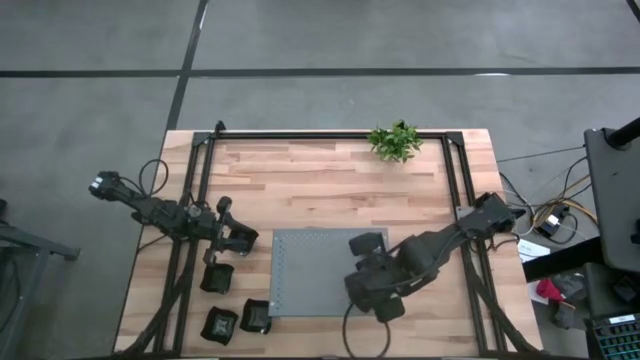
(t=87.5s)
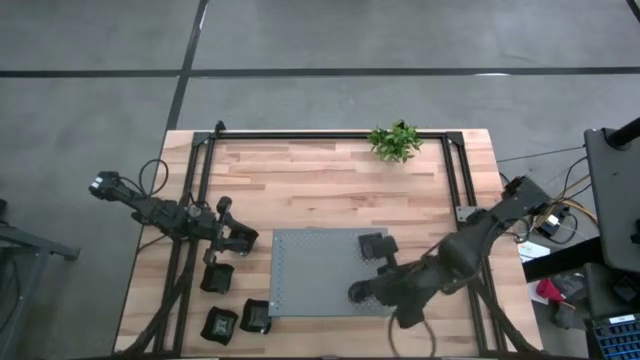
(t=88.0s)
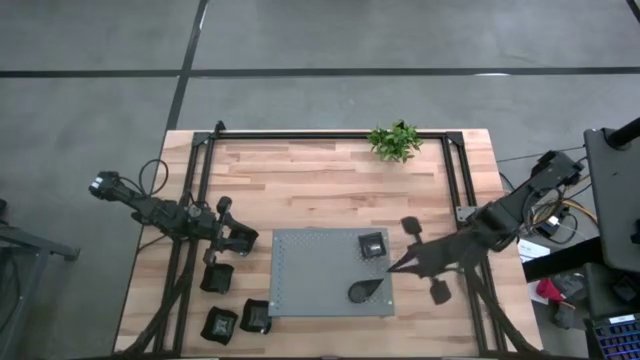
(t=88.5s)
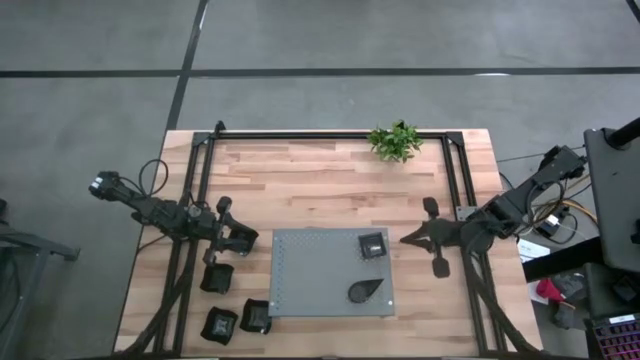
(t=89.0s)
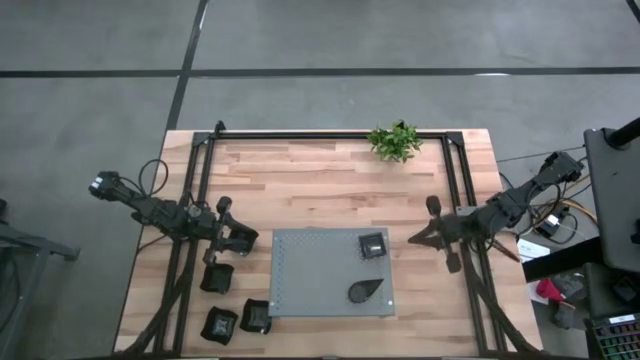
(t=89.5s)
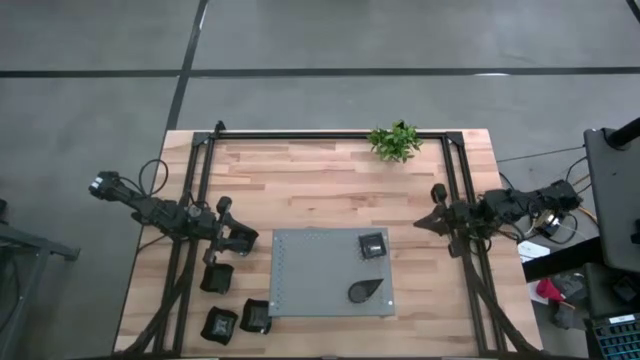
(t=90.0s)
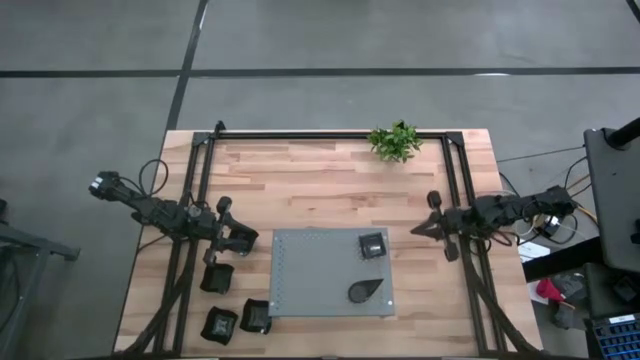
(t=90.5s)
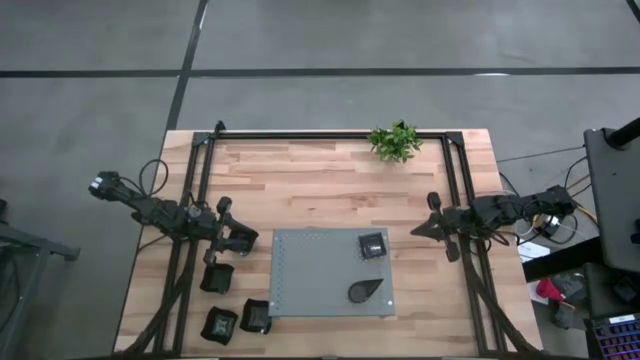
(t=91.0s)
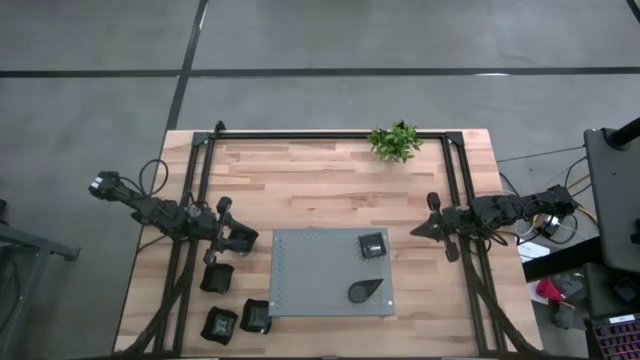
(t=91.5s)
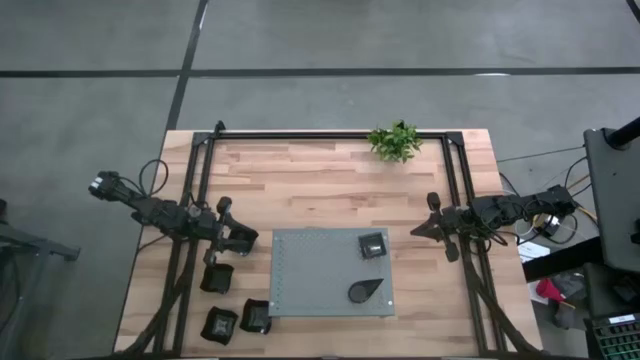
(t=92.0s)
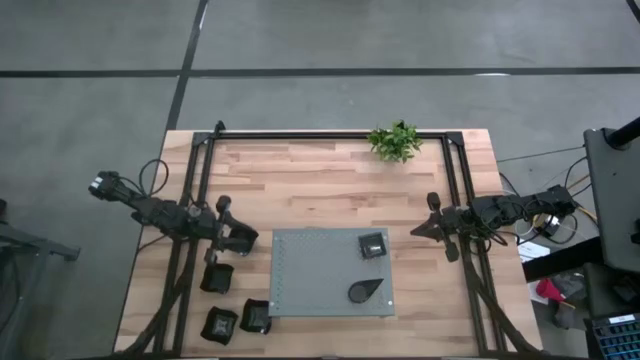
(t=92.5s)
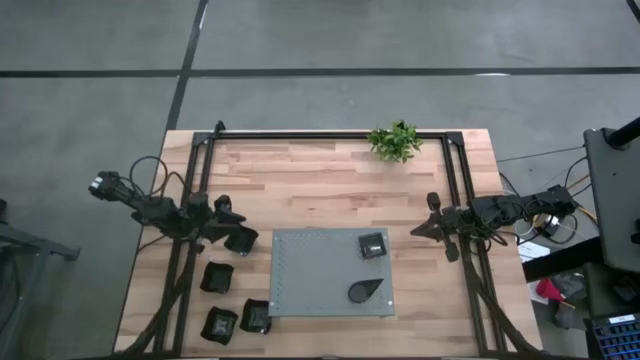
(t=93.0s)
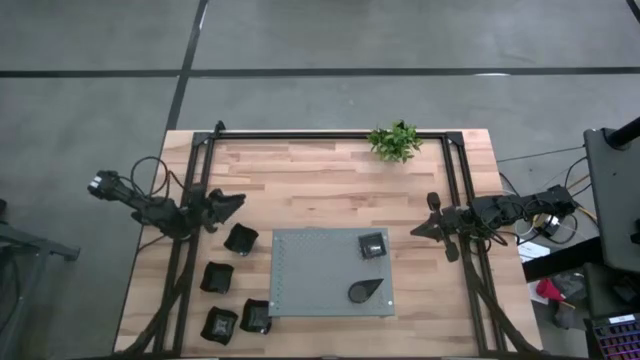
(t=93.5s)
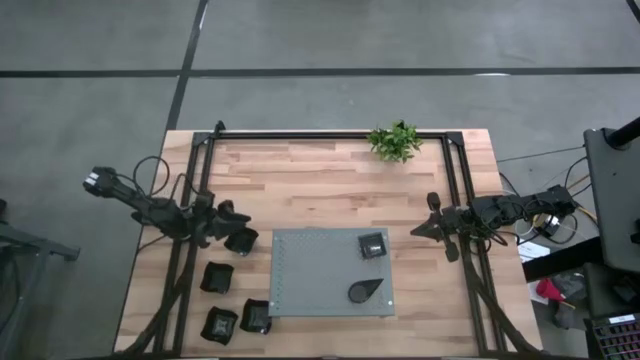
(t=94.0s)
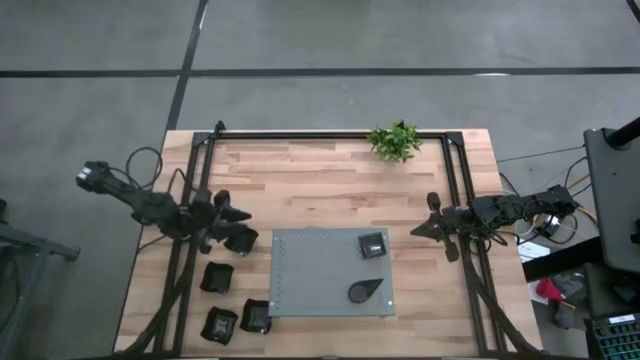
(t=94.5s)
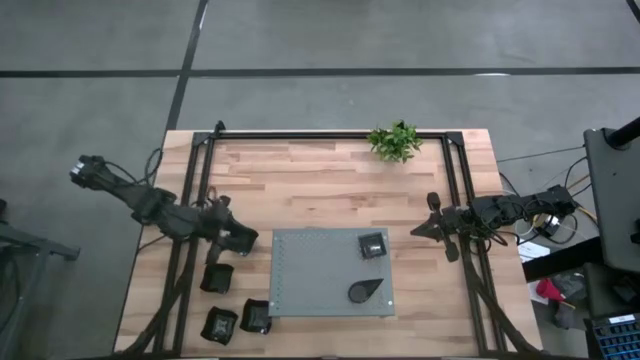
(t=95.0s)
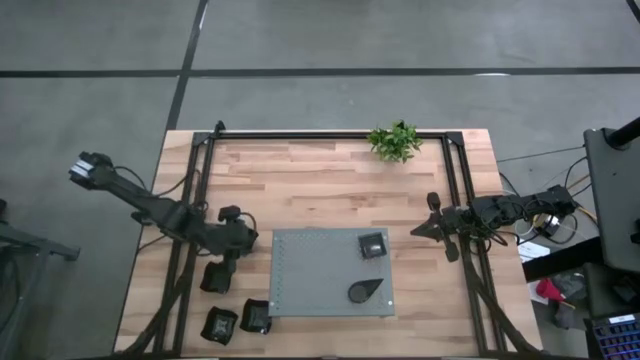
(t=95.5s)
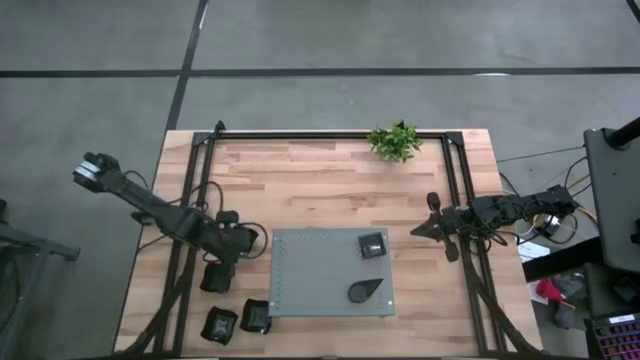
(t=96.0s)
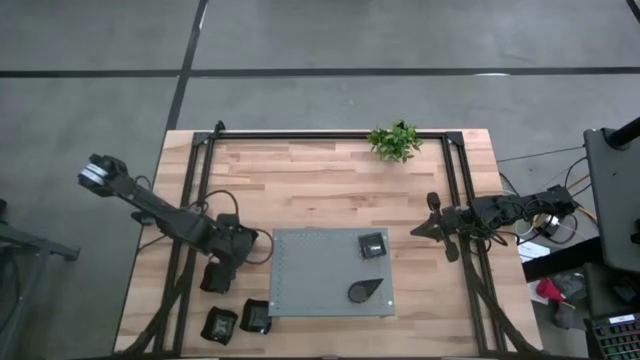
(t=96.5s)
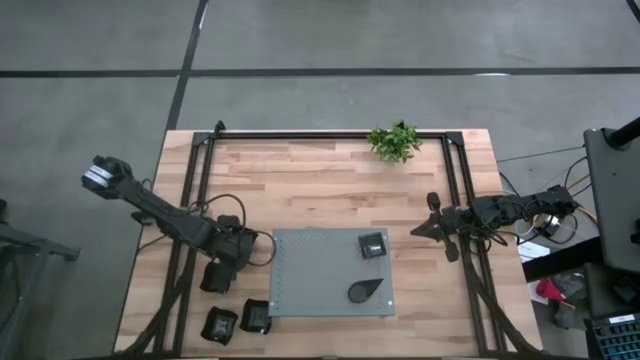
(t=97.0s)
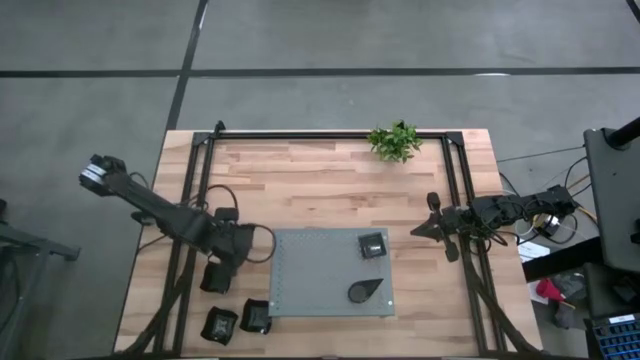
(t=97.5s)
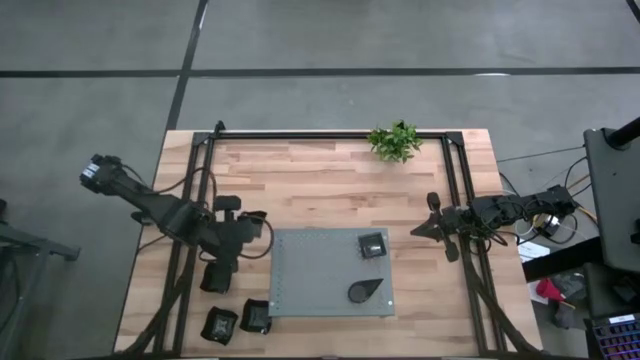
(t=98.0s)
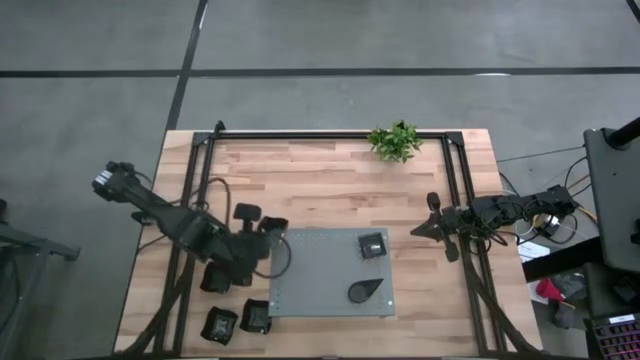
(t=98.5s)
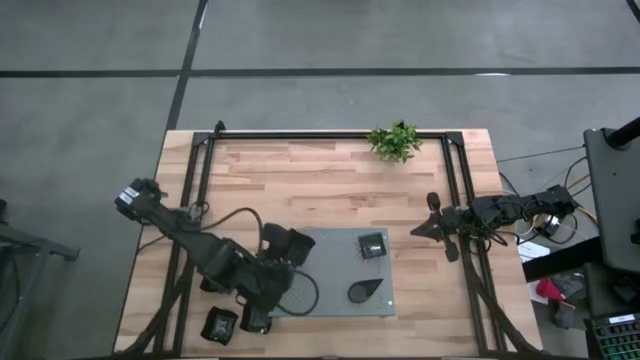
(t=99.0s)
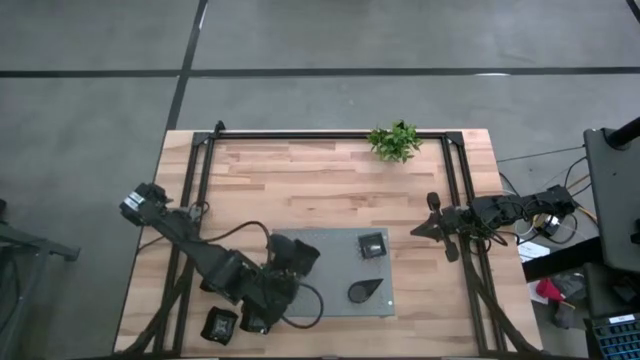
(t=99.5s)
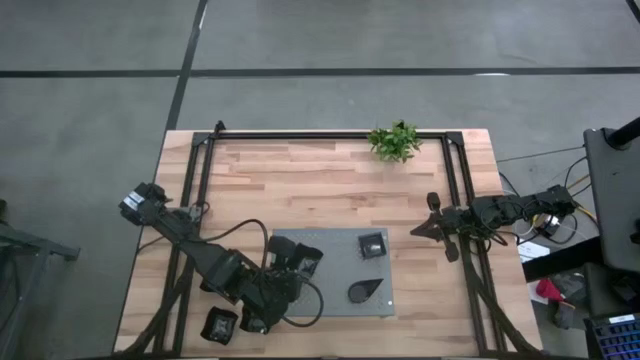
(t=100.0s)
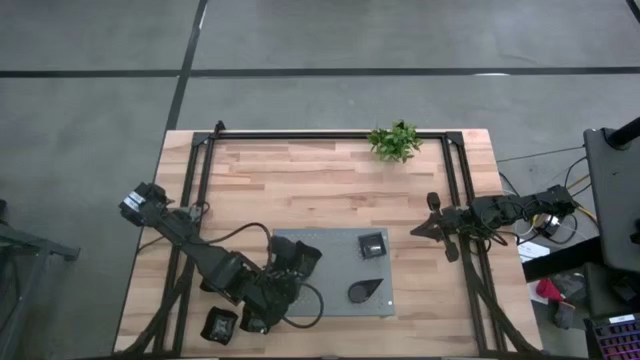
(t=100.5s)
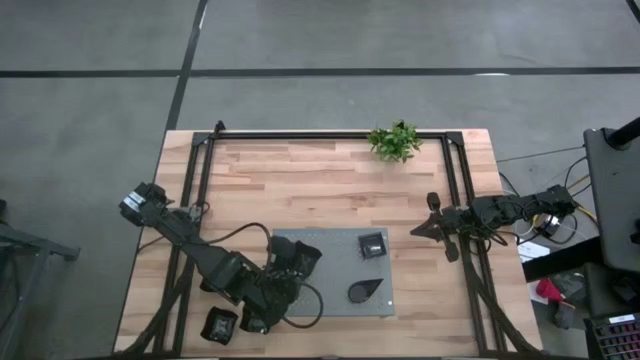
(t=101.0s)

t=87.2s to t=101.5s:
Task: Pick & Place Mini shaped plates
Put the distorted square plate on the shelf

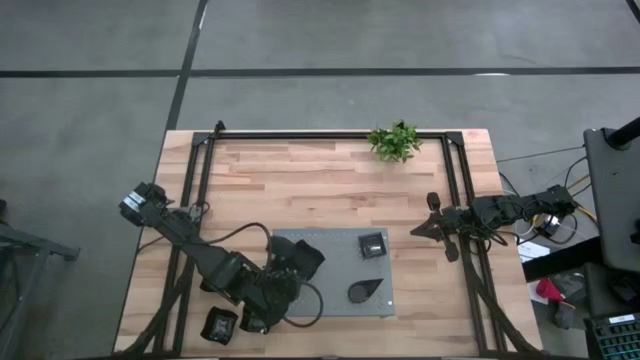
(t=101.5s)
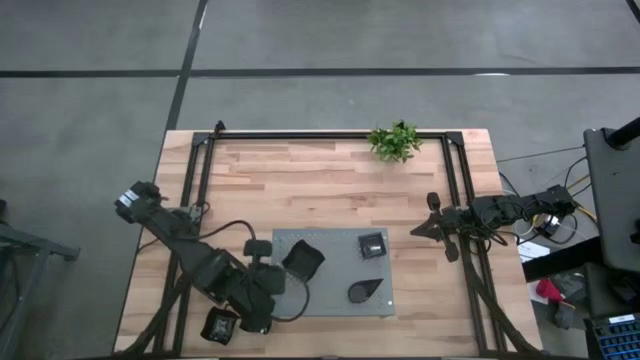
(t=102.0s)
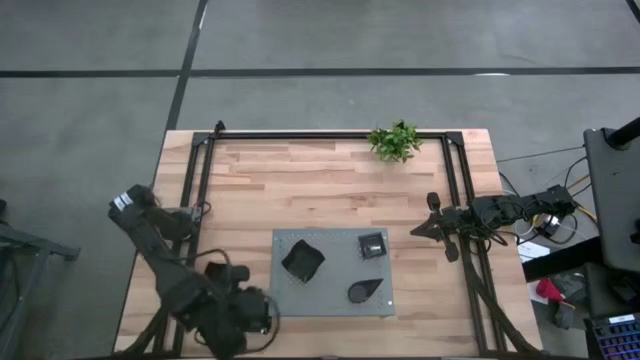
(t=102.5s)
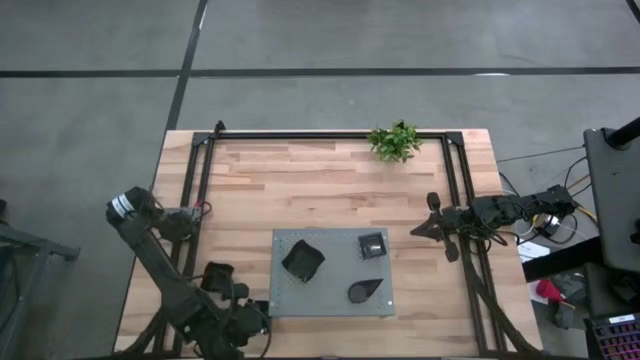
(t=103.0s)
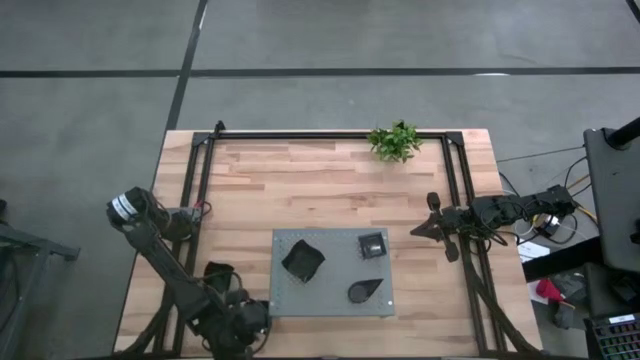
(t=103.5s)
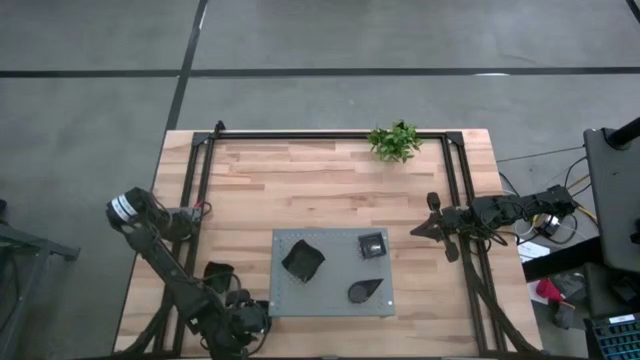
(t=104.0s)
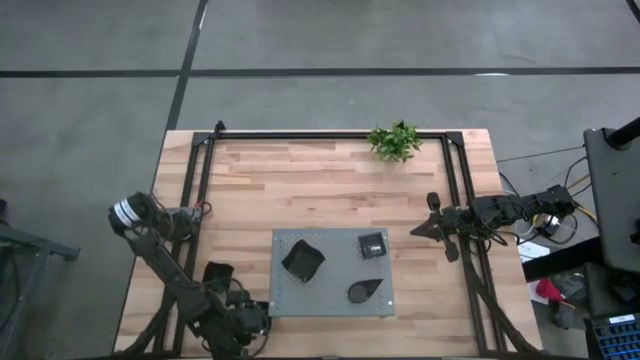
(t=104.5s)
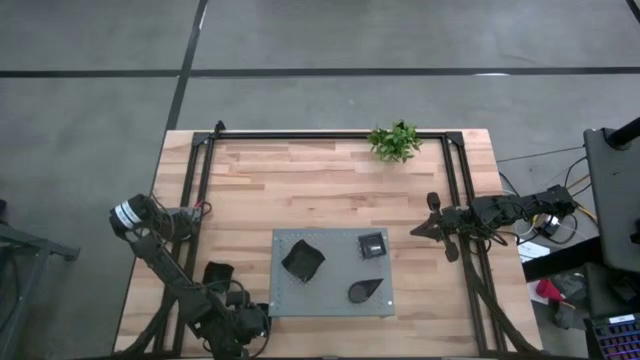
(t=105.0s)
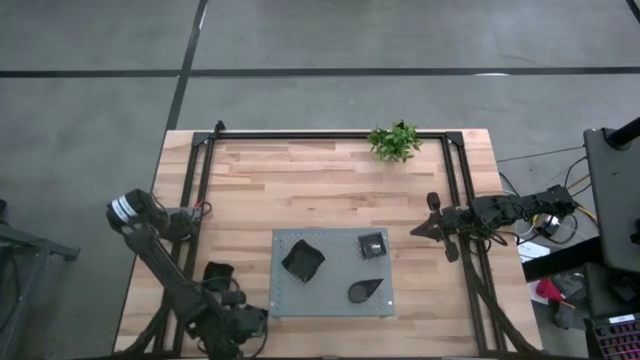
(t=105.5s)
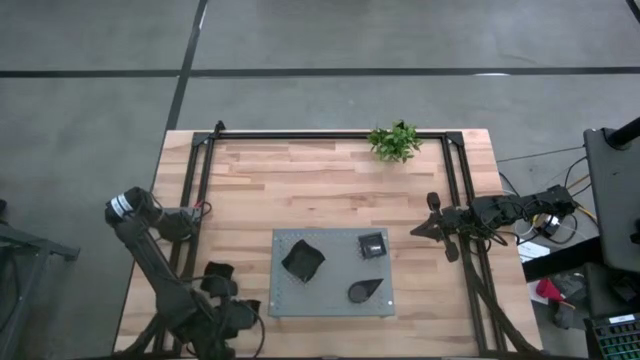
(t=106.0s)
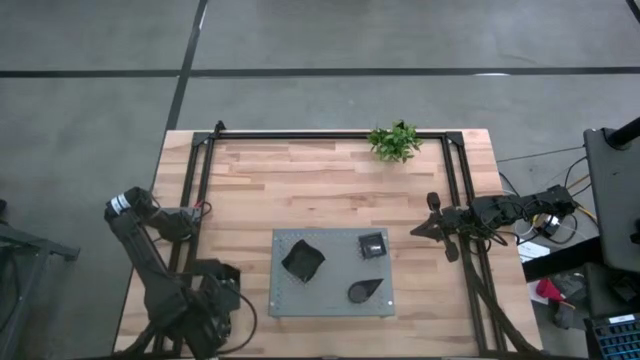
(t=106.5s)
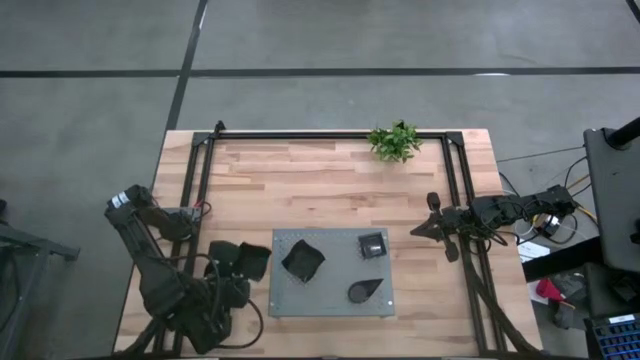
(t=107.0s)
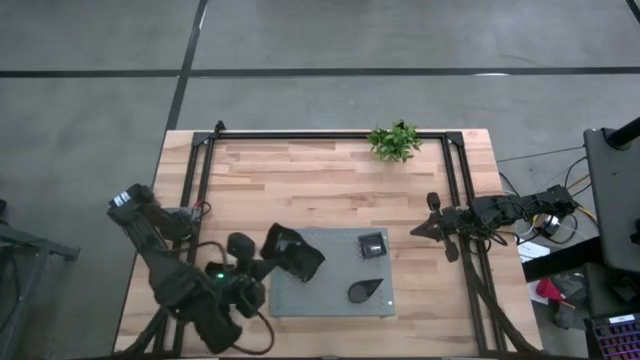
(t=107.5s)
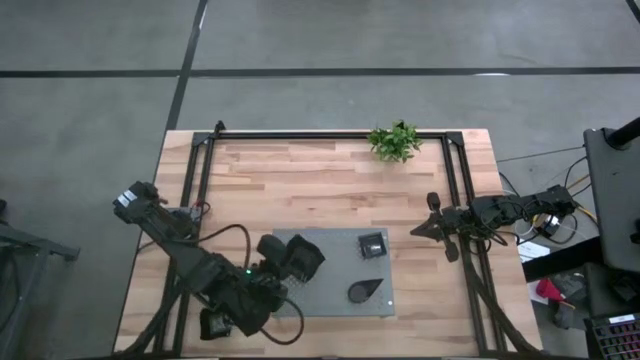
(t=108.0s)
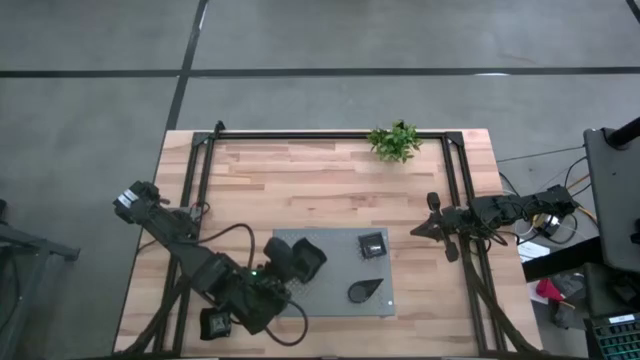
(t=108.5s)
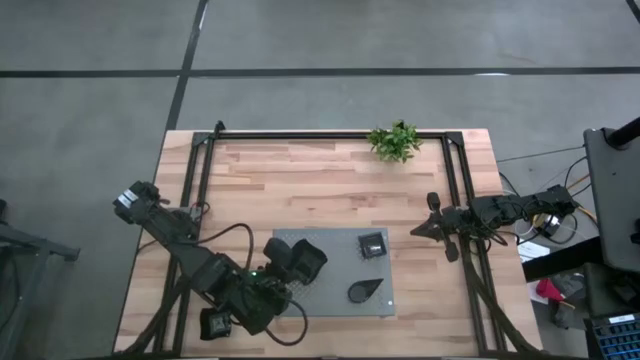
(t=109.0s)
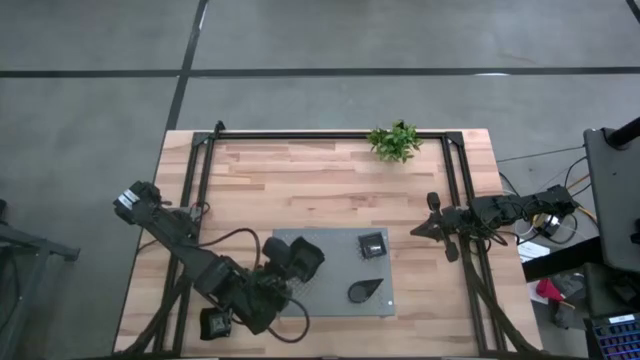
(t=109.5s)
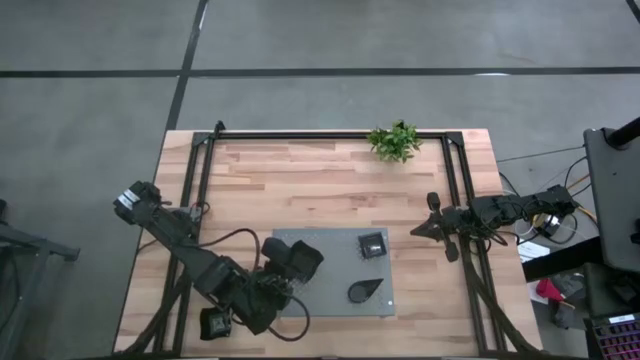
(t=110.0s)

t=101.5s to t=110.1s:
Stack the distorted square plate on top of the distorted square plate on the shelf
